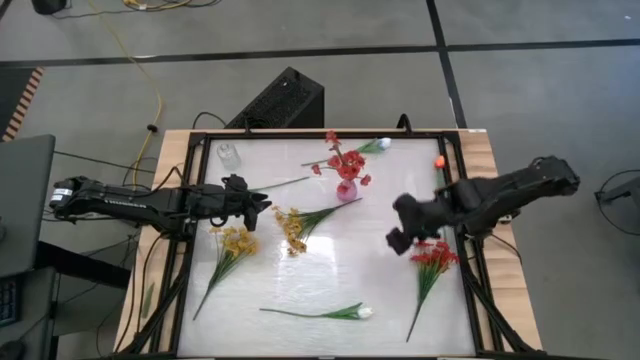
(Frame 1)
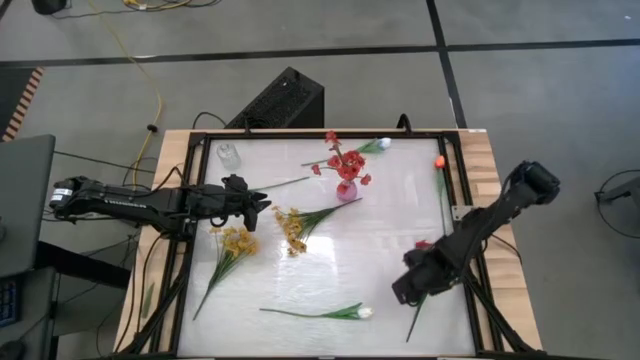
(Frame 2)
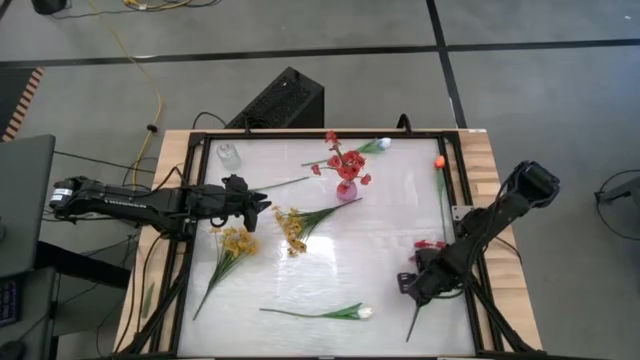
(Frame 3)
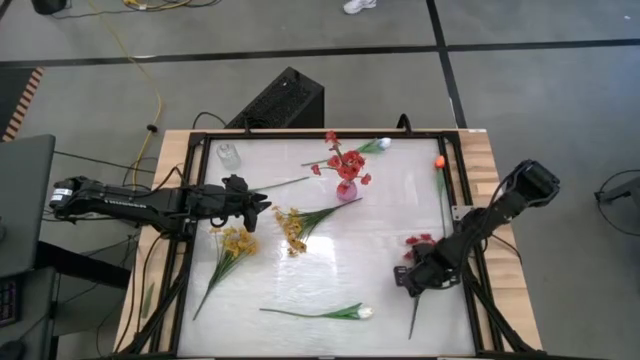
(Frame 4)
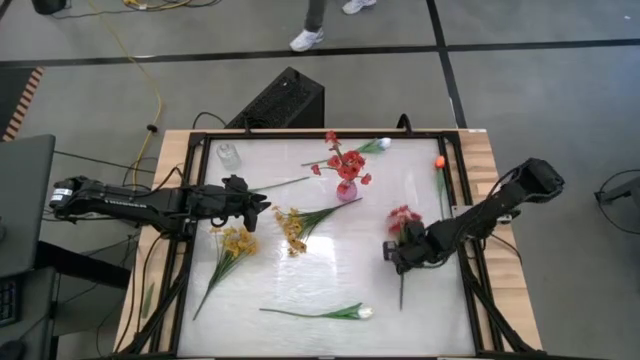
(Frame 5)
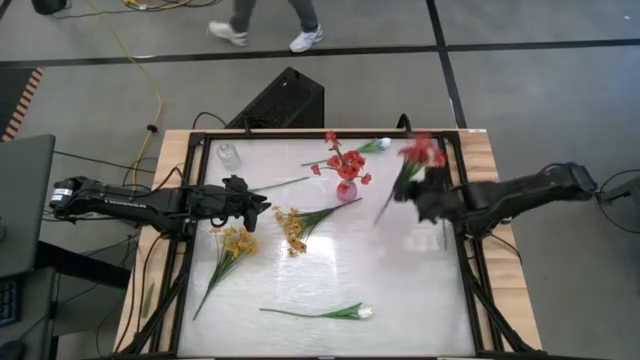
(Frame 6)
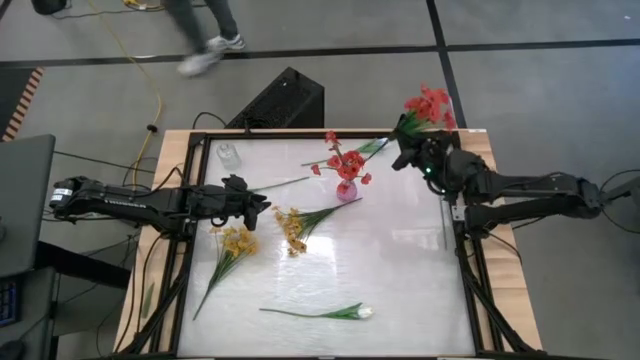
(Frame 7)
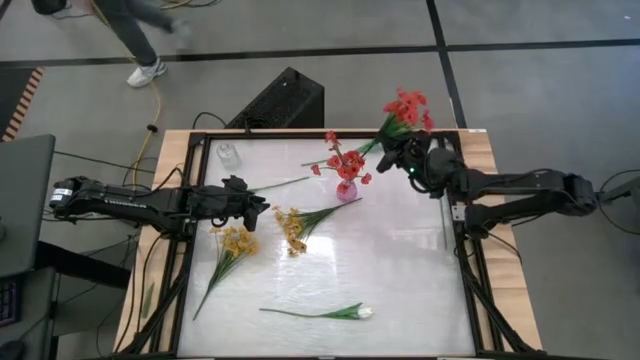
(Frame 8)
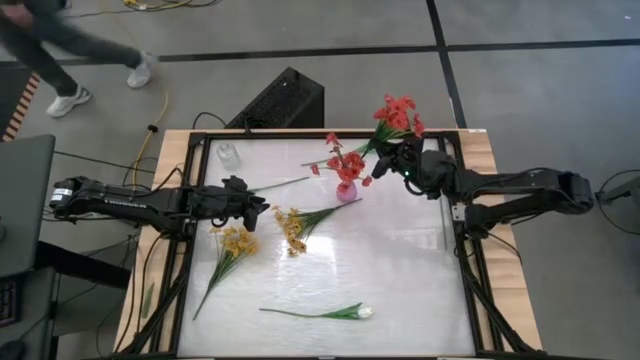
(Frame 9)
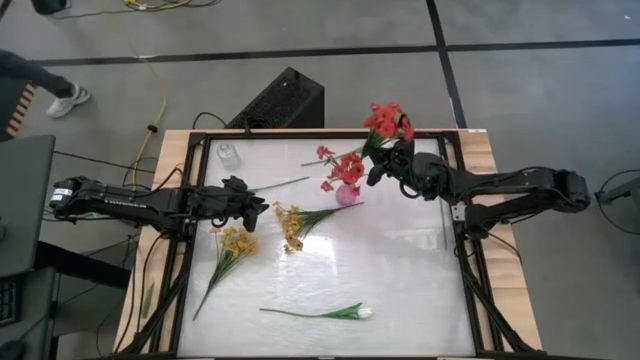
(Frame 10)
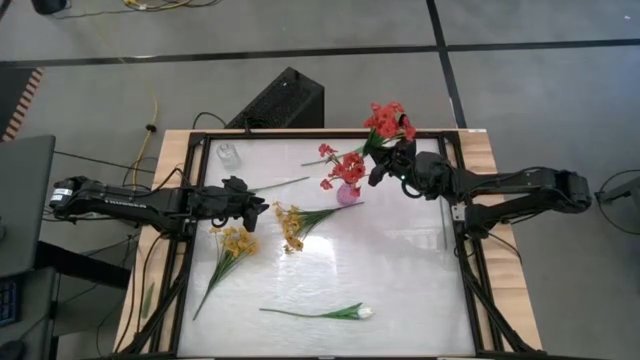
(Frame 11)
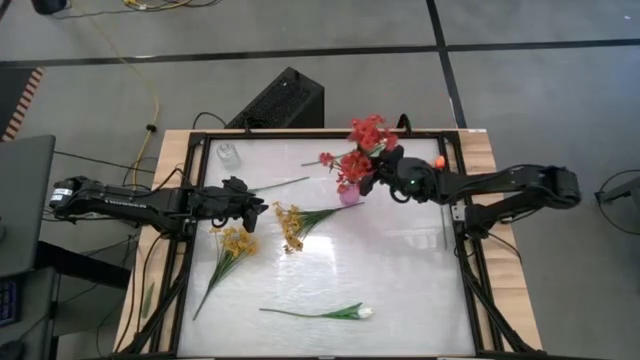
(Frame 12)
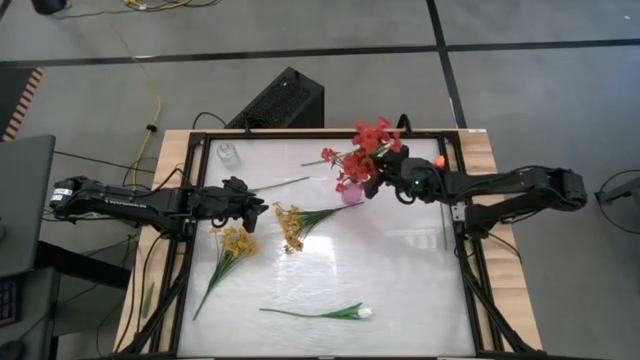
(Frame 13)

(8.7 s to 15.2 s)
Task: Sort flowers into vase by color
Put the red flower into the violet vase

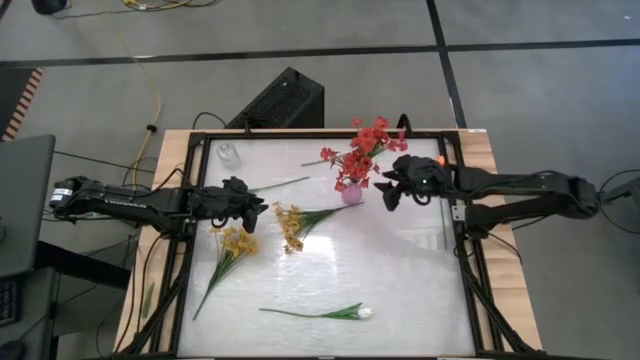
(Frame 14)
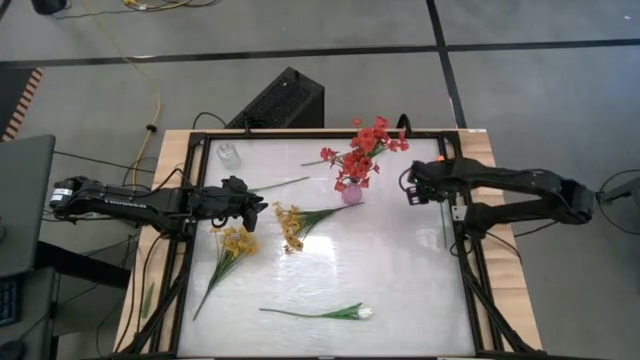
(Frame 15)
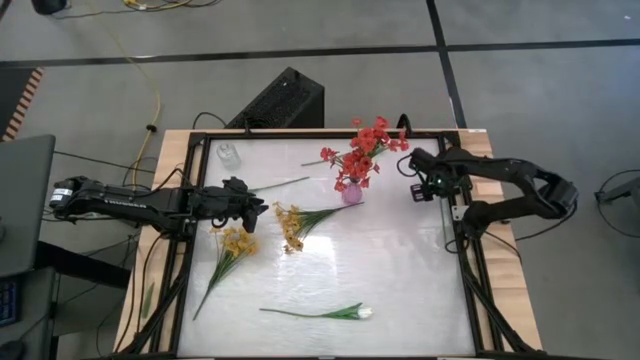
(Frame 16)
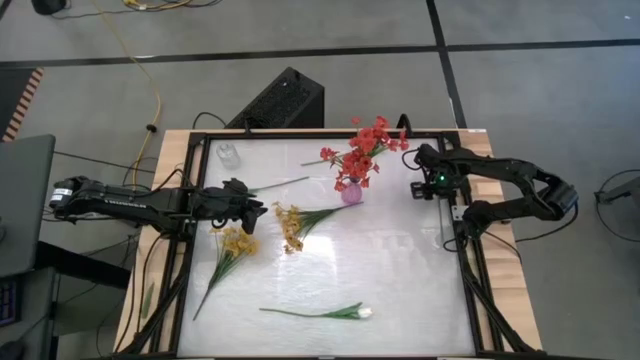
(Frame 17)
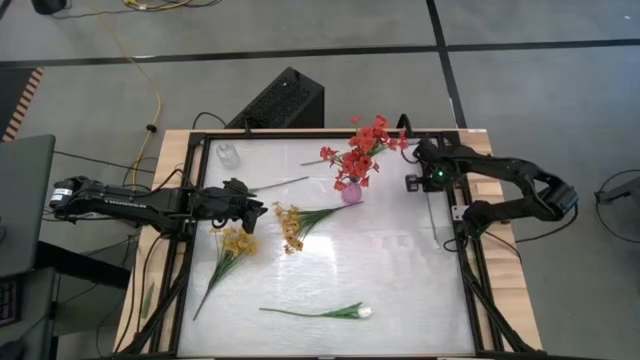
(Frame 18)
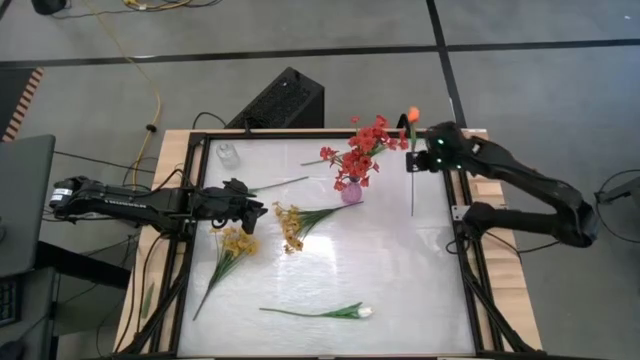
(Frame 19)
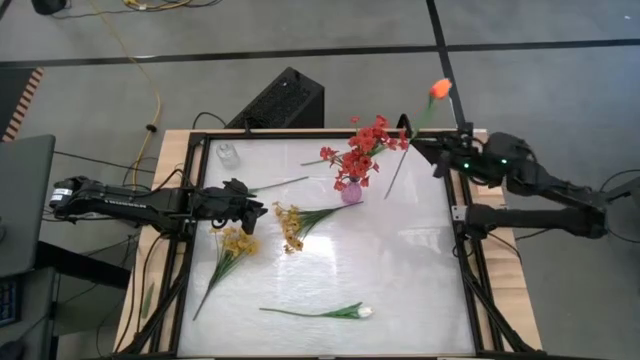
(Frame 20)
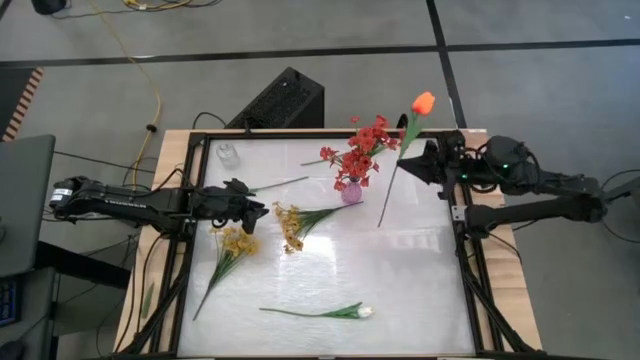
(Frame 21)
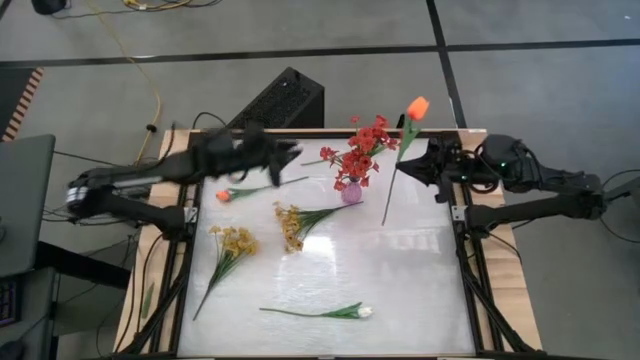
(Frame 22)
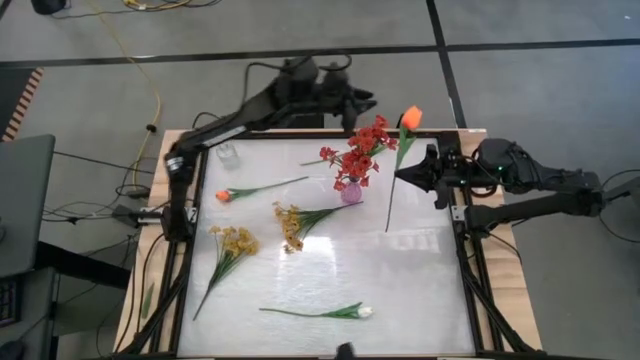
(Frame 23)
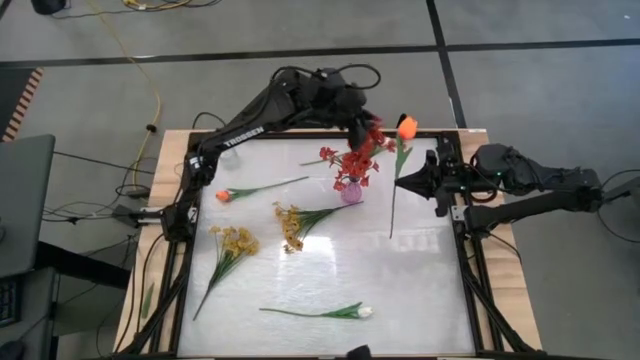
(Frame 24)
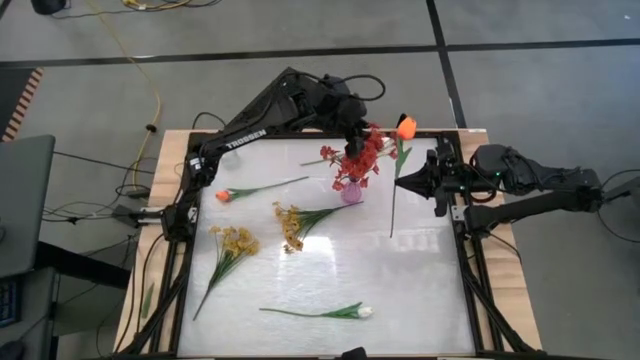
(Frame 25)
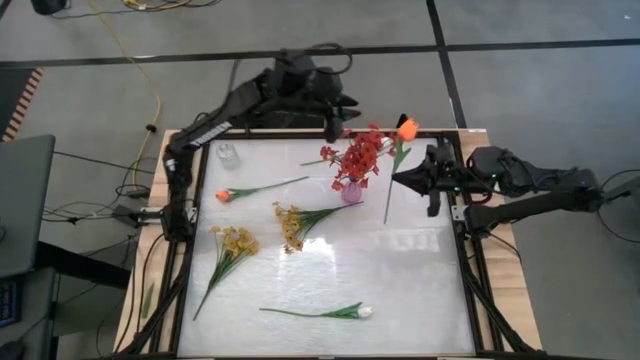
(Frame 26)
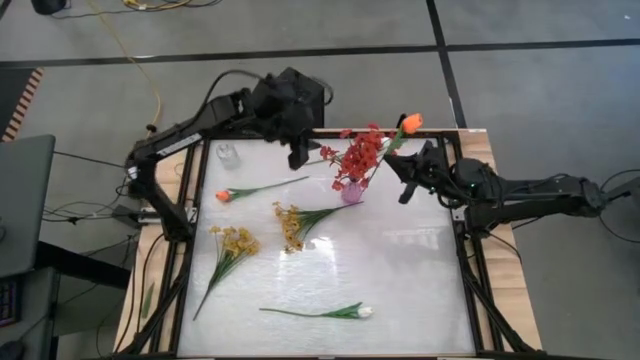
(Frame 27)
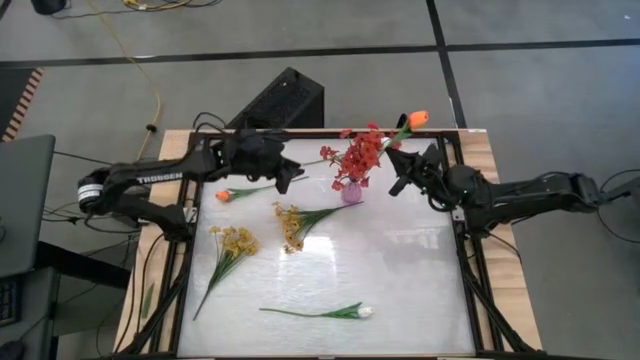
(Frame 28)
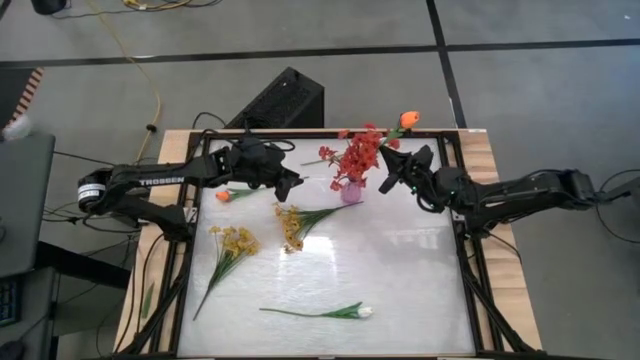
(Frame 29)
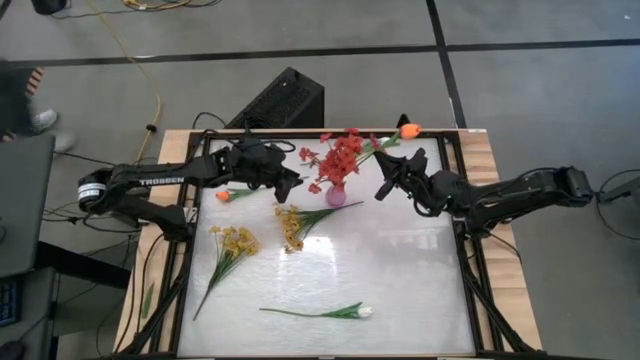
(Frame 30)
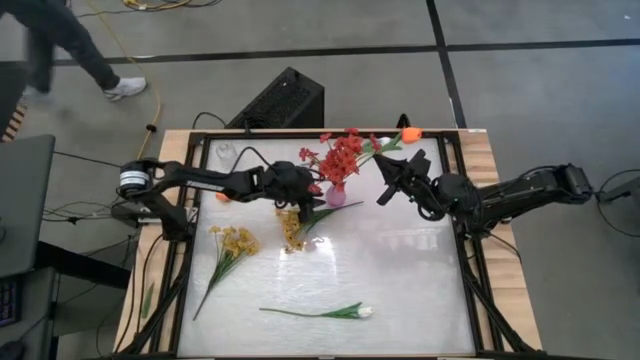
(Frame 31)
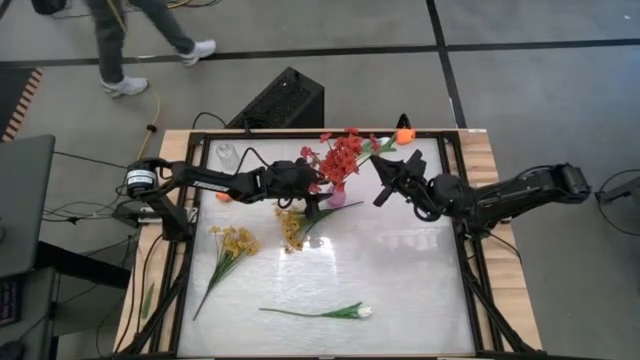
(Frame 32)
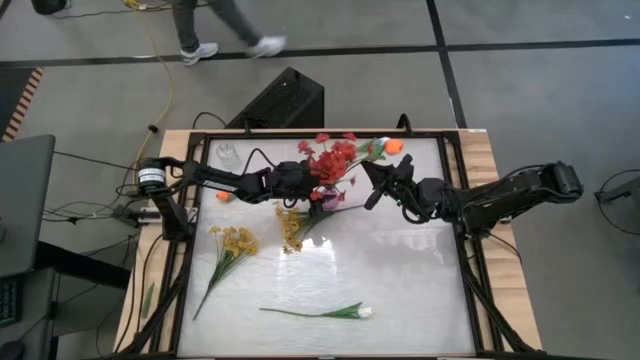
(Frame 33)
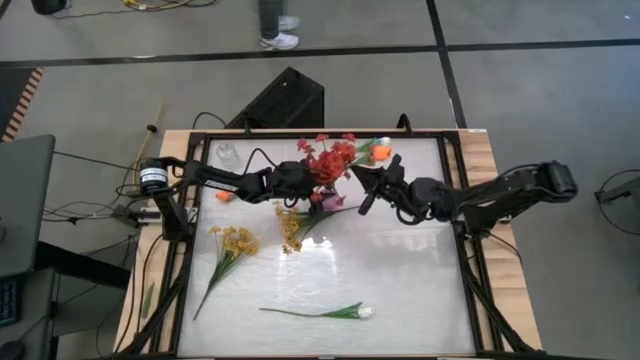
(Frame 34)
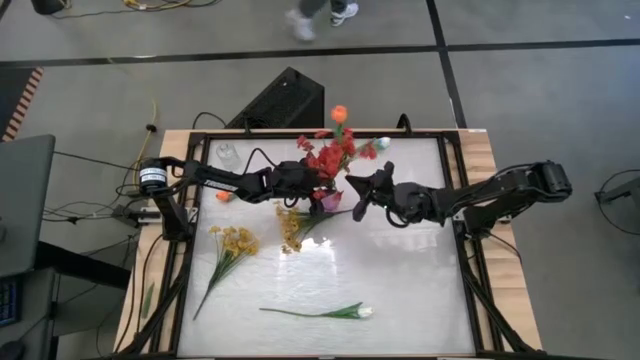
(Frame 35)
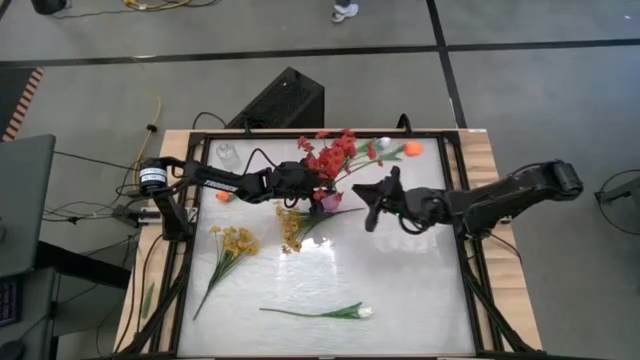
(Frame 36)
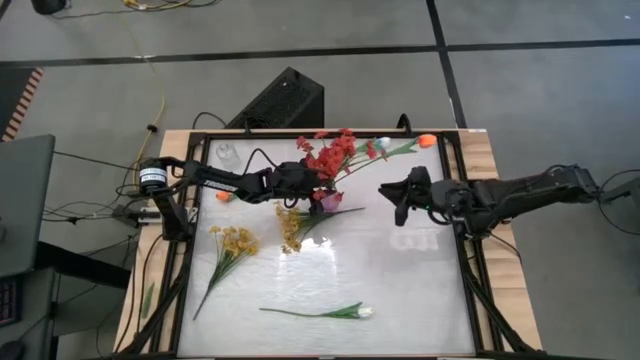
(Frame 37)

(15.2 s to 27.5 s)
Put the right orange tulip into the violet vase

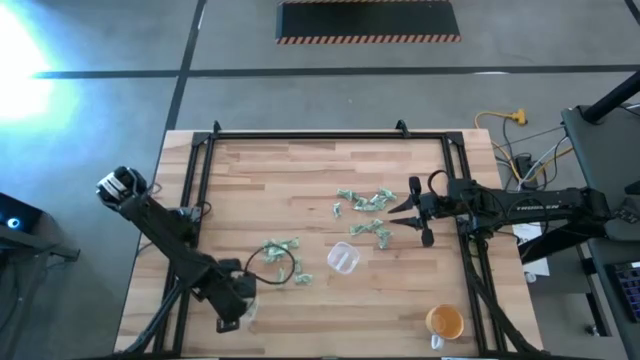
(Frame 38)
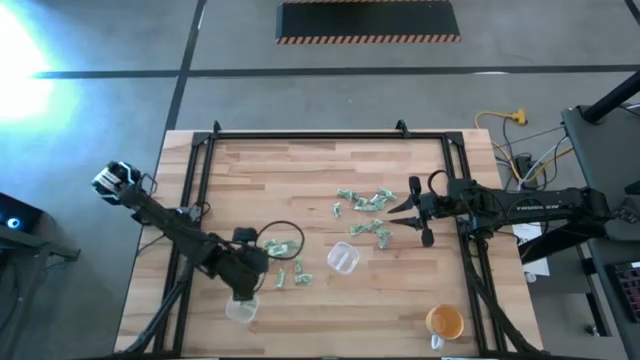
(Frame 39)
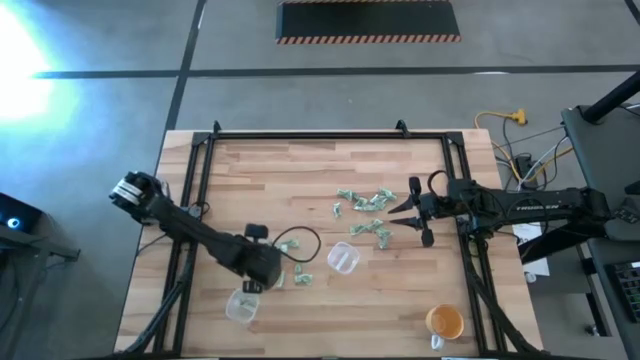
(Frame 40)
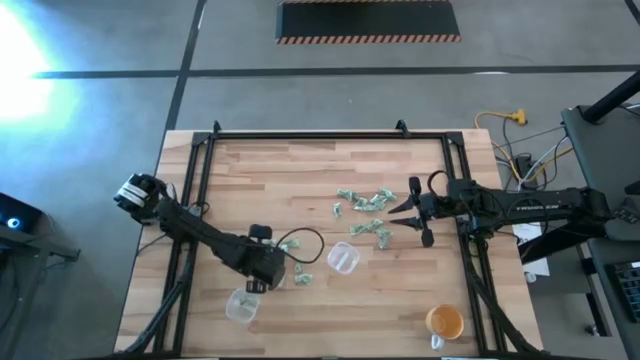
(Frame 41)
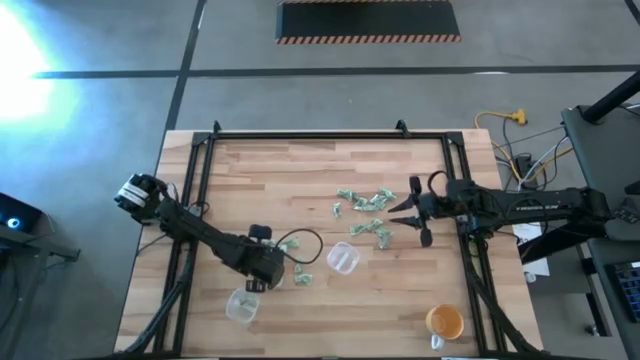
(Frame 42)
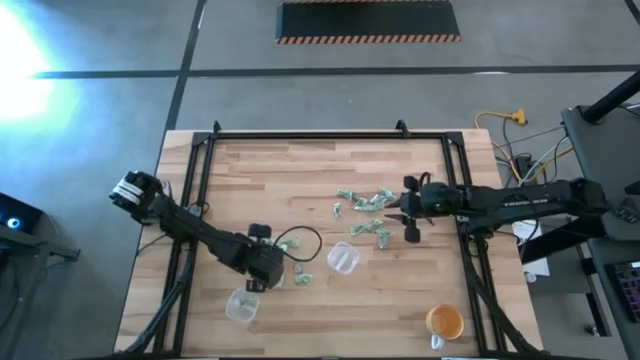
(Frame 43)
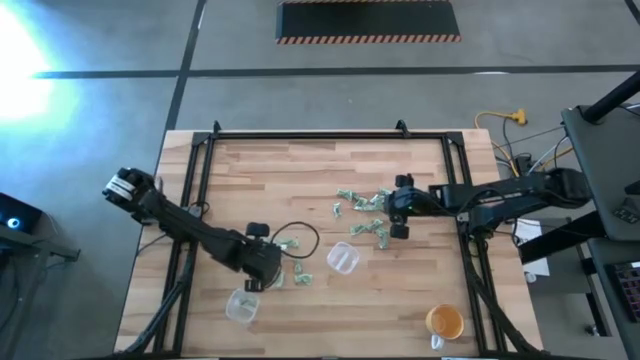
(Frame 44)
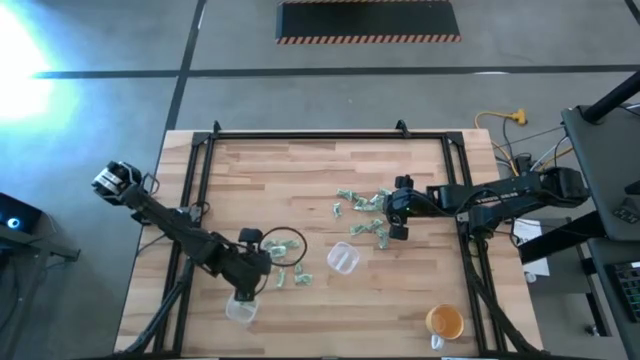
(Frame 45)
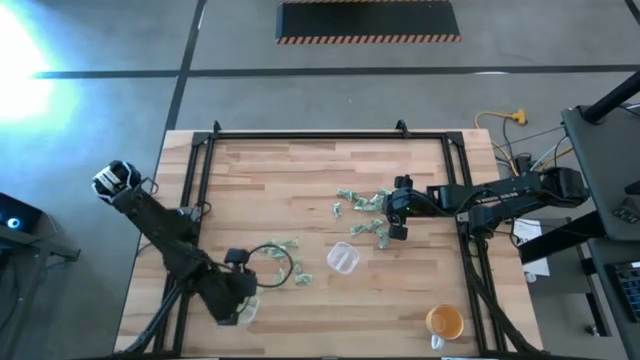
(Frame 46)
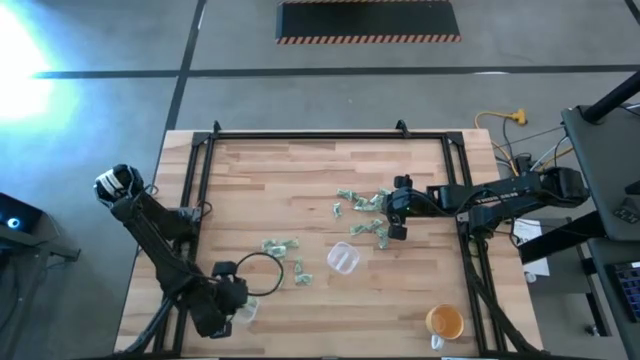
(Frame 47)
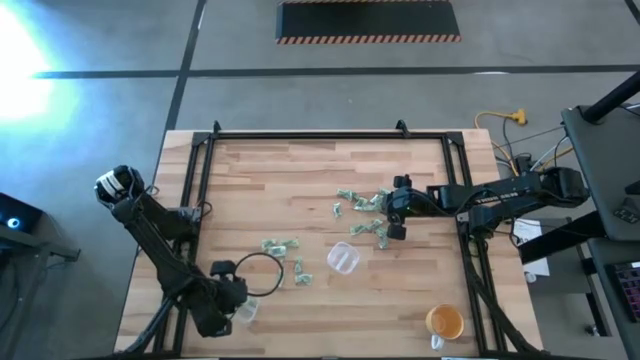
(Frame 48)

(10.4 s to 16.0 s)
Task: Pick and place items into bin
Put the light green packet into the bottom transparent bin
